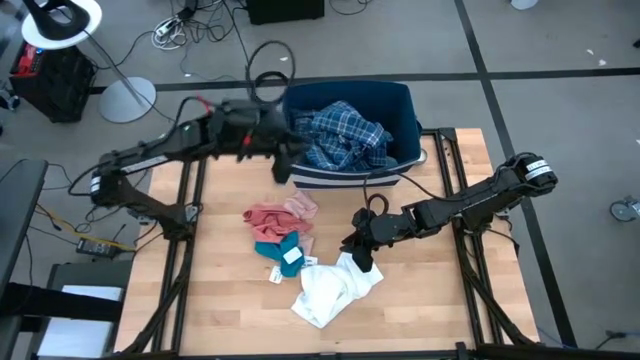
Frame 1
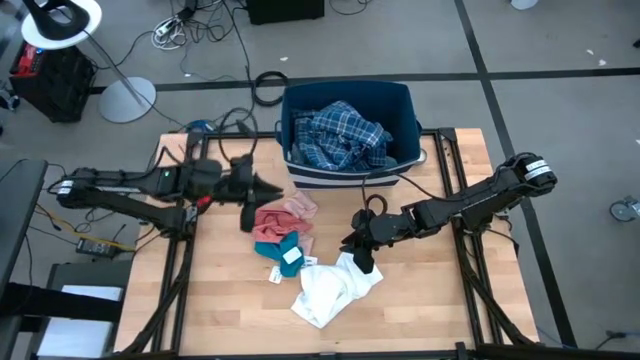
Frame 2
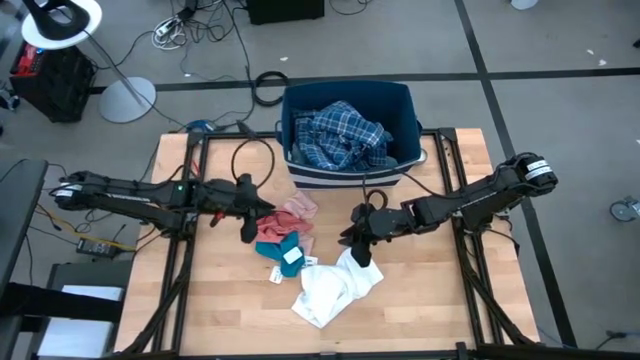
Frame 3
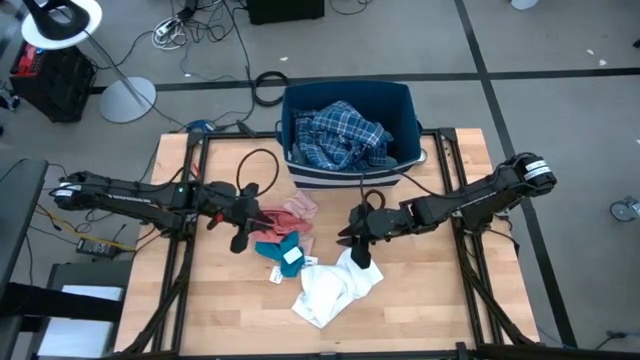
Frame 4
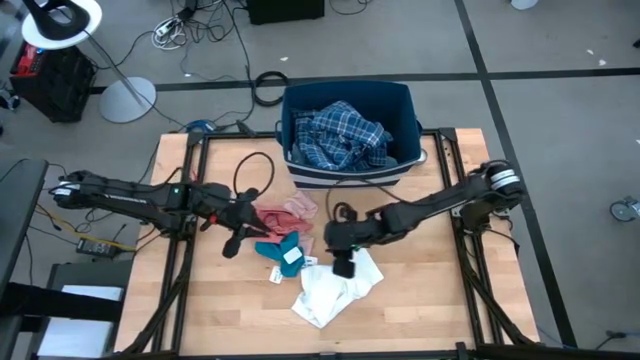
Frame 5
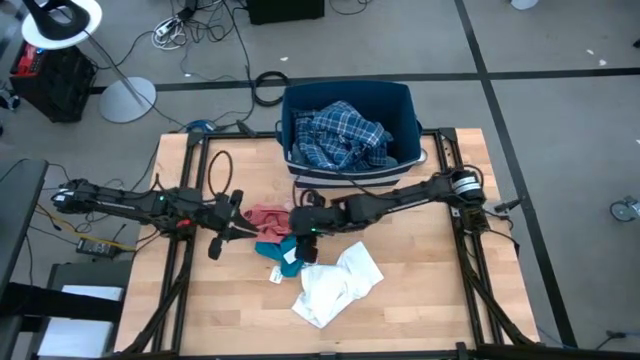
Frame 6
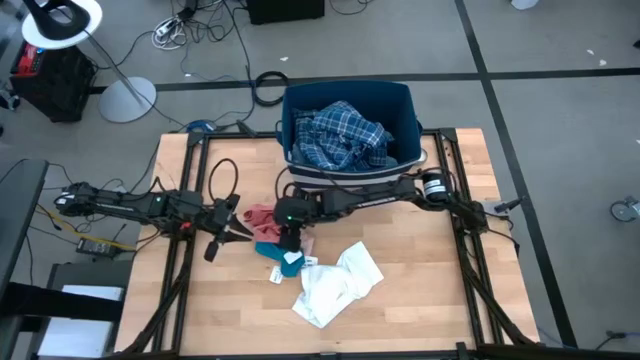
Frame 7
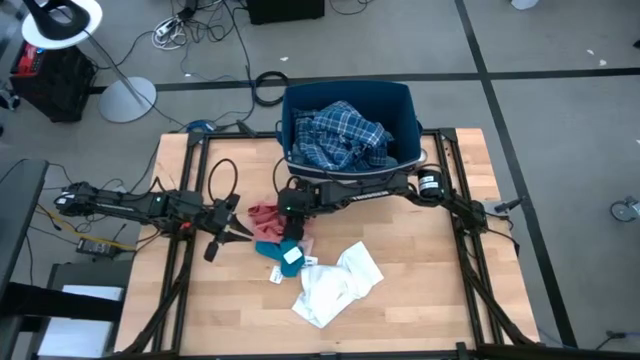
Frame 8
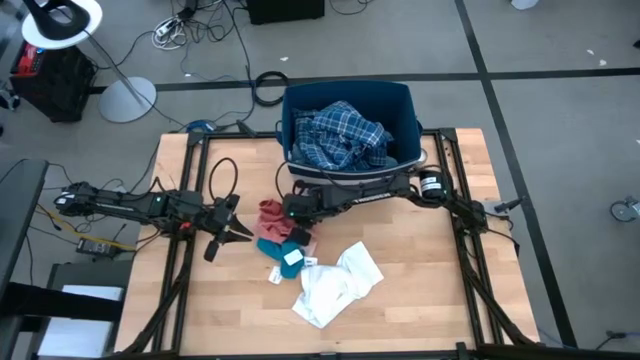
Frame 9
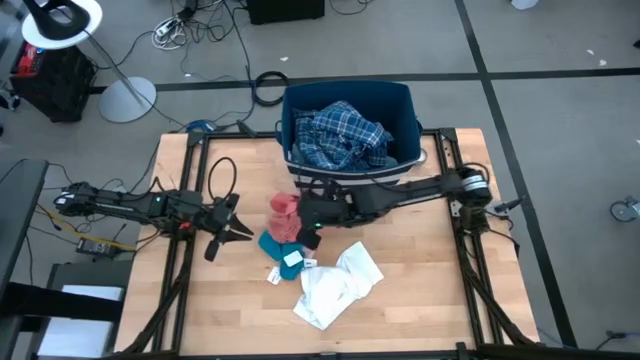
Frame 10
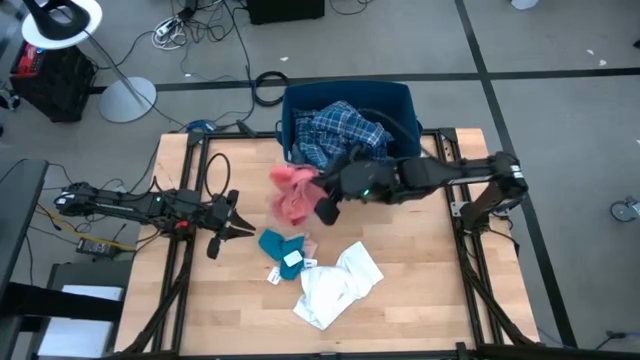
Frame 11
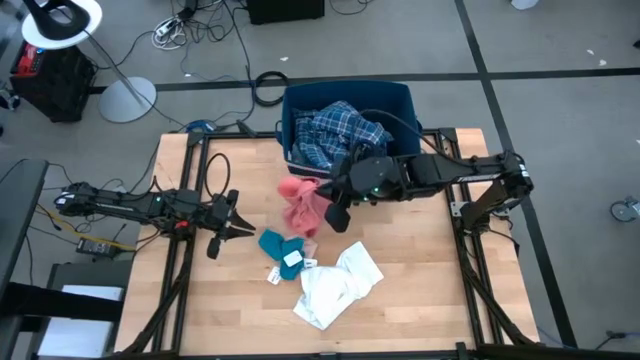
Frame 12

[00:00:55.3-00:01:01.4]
Task: Sort clothes
Put the light orange underwear into the blue bin

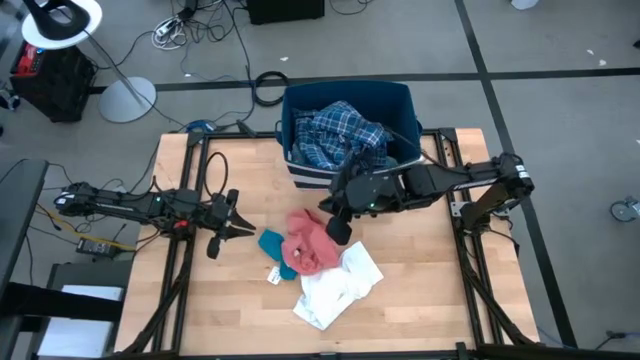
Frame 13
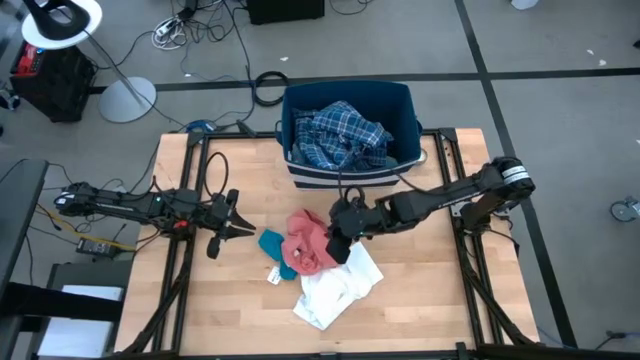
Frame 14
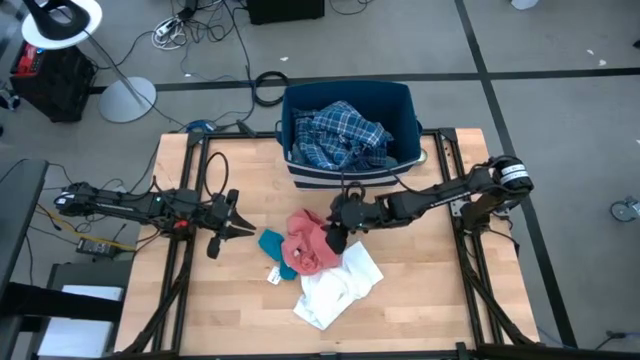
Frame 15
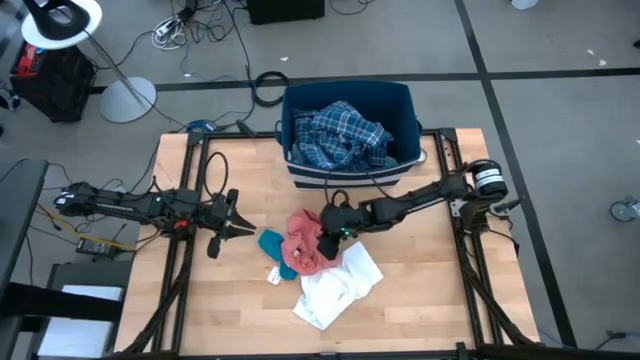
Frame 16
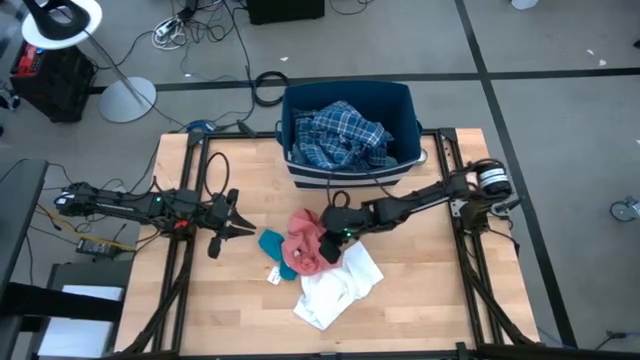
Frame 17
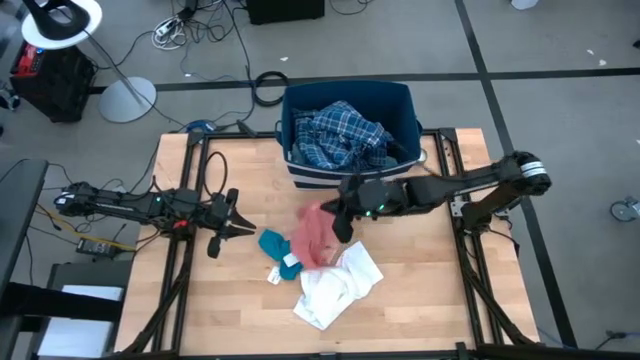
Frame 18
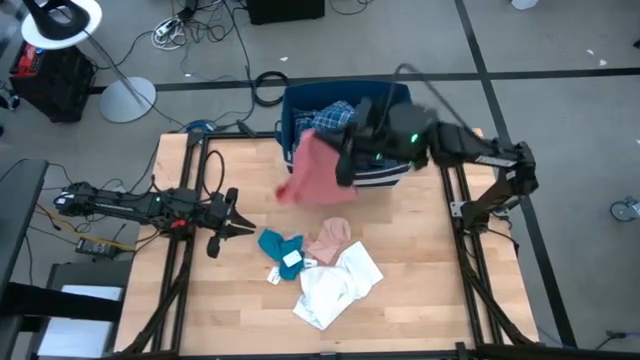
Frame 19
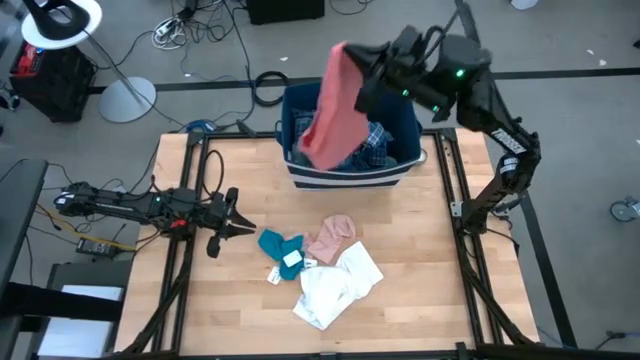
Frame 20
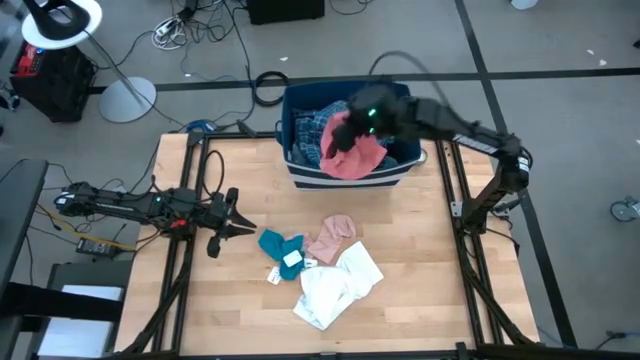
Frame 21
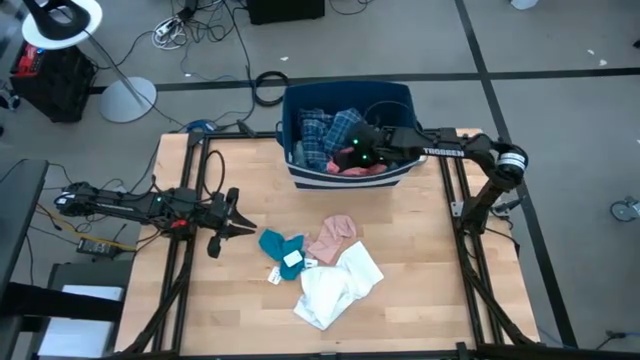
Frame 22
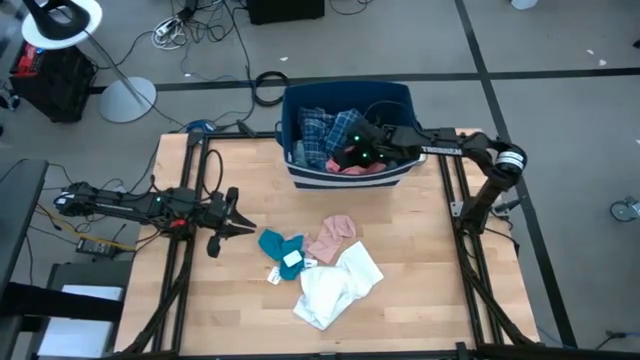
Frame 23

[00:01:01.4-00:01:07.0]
Put the light orange underwear into the blue bin

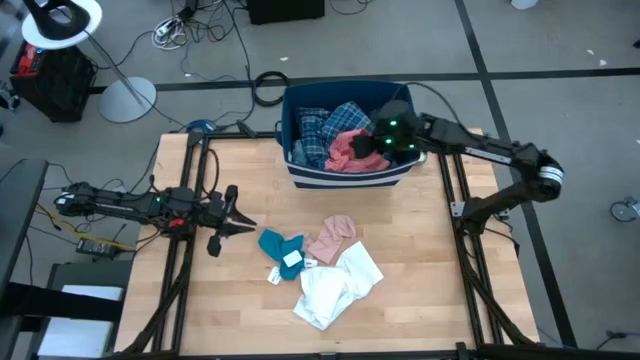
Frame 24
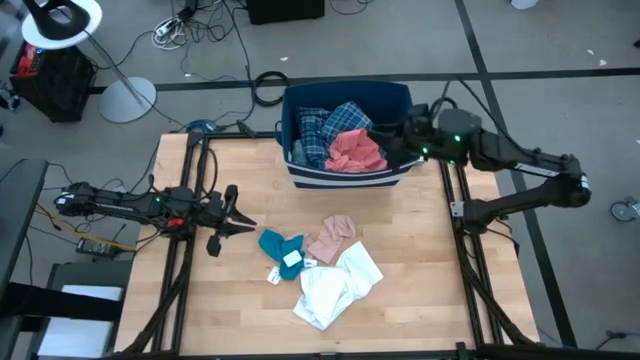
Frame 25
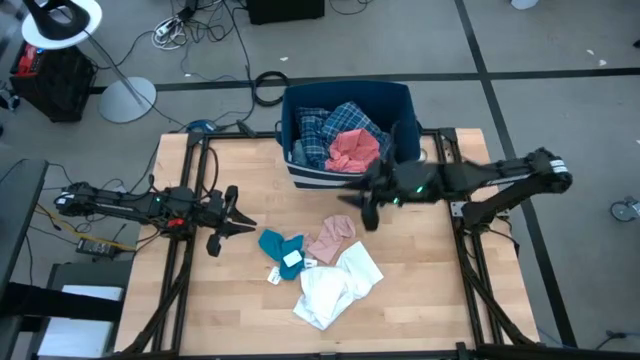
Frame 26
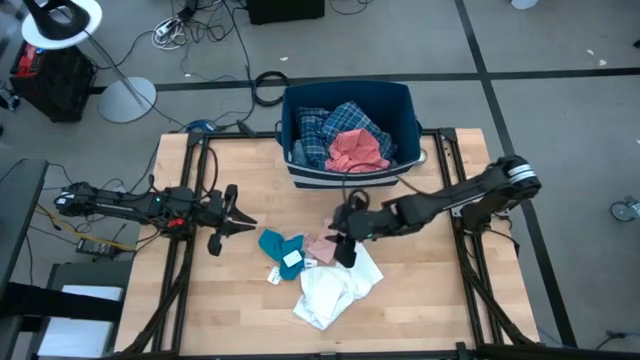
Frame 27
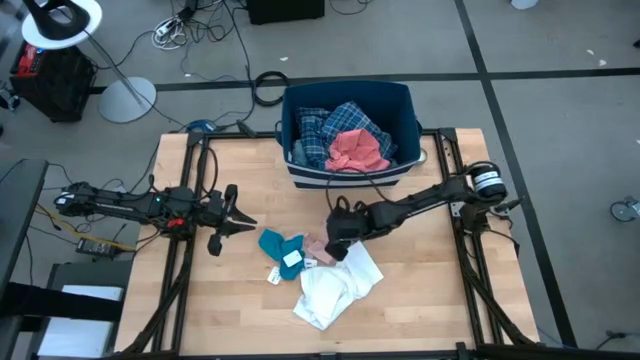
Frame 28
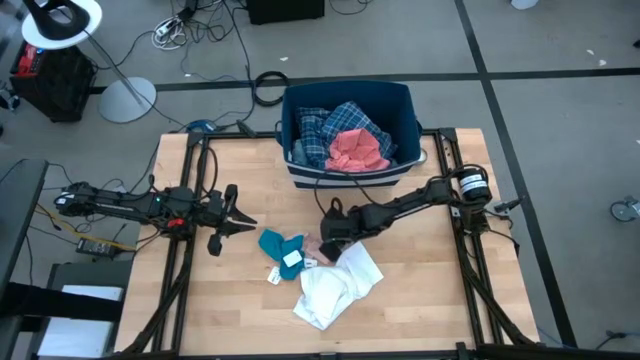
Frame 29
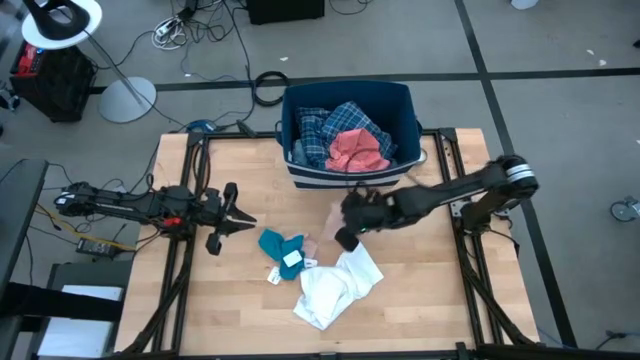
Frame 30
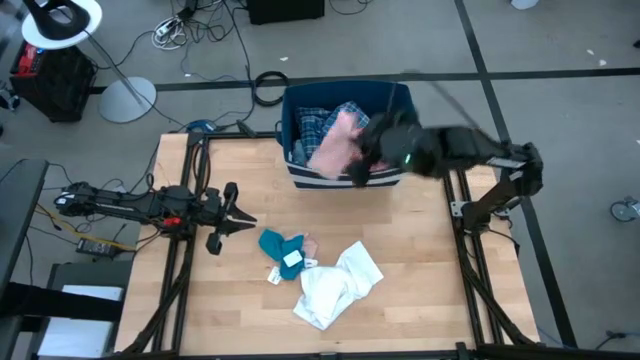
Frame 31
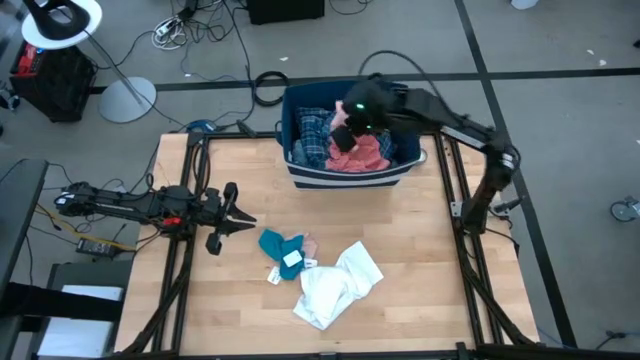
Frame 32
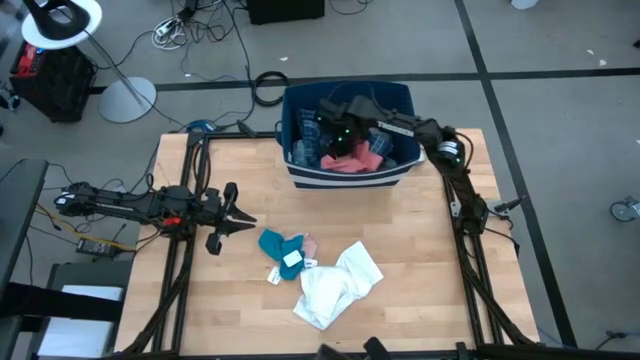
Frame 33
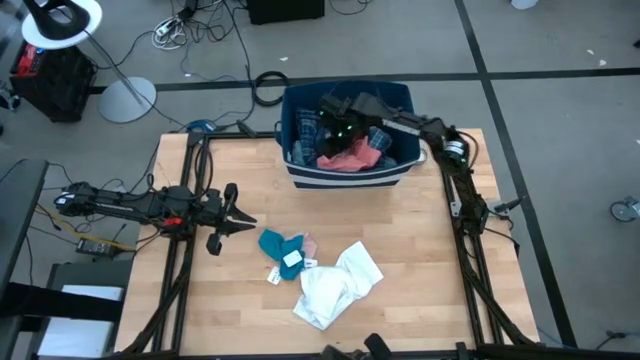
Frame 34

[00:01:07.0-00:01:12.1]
Put the light pink socks into the blue bin

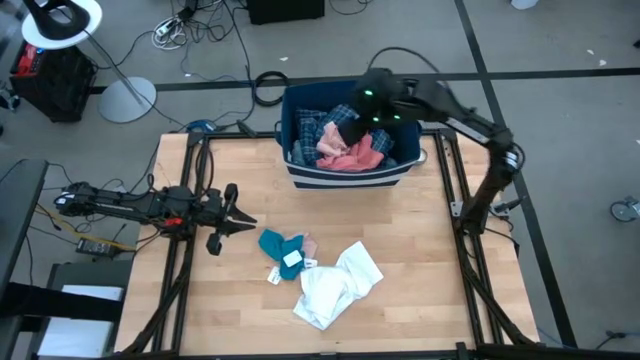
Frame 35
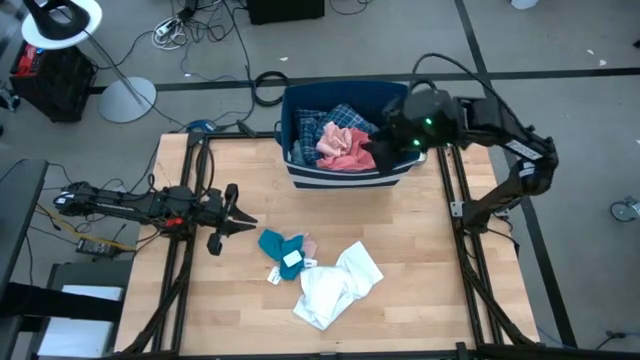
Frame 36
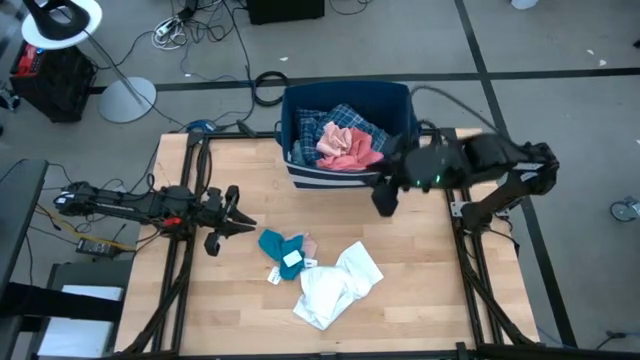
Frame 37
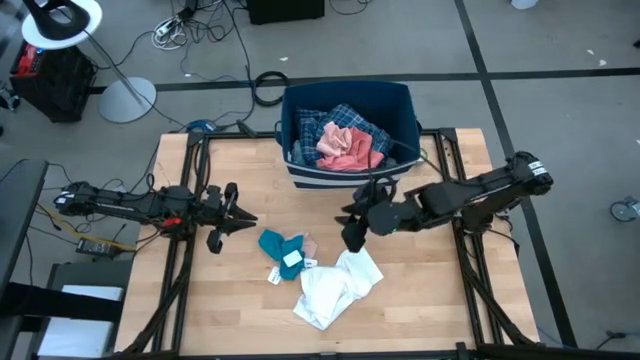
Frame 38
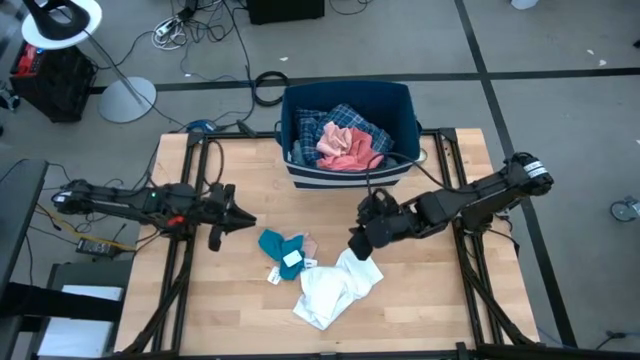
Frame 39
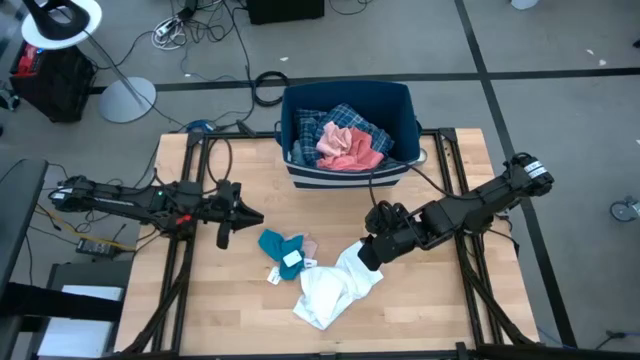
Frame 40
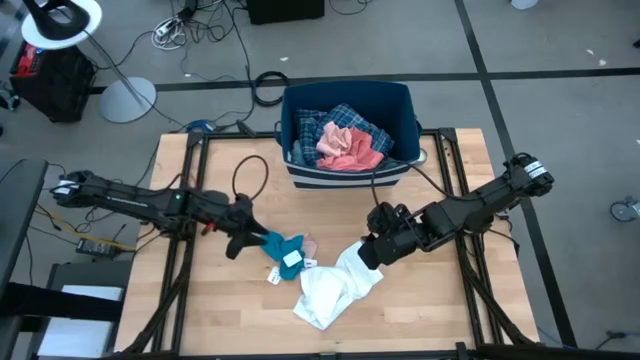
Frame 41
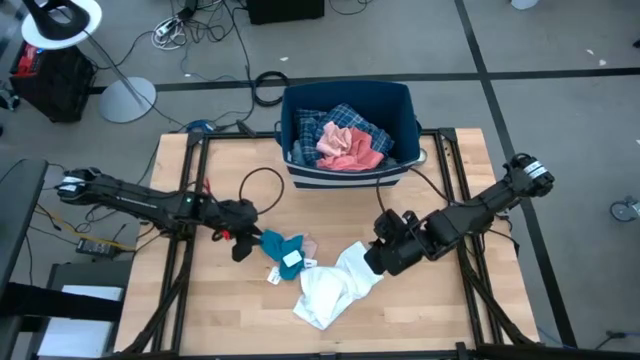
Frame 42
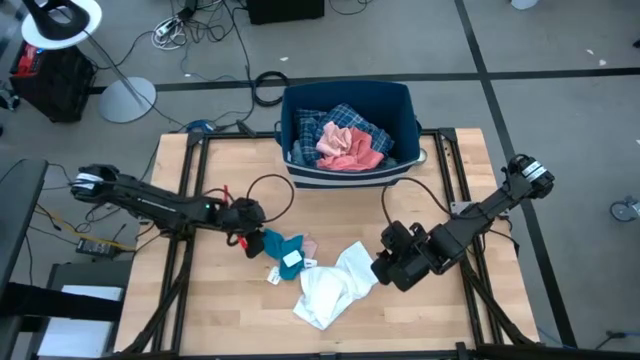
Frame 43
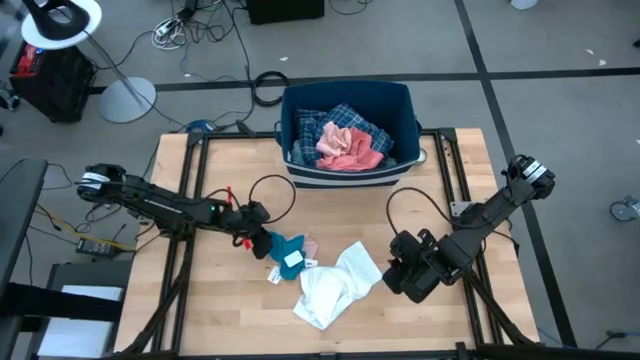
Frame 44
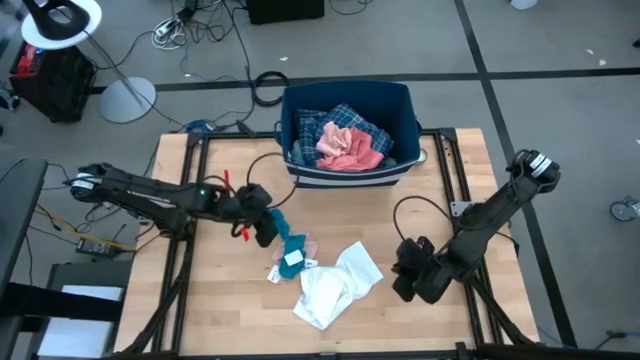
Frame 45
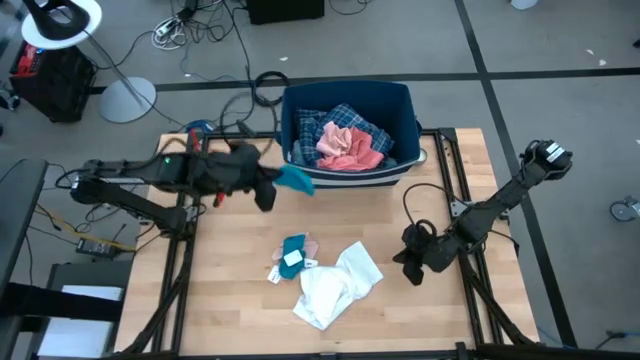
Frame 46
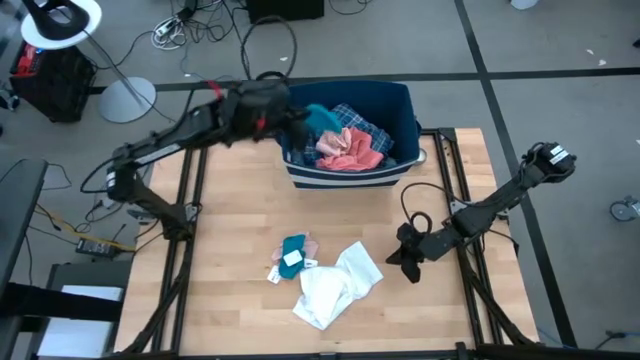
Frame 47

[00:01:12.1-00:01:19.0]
Put the blue socks into the blue bin
